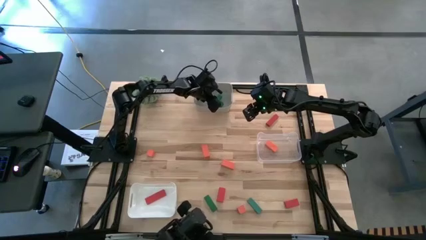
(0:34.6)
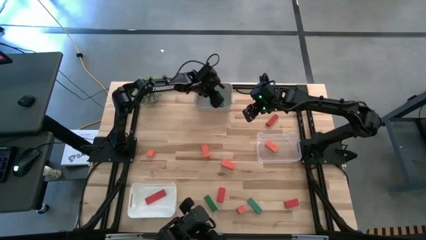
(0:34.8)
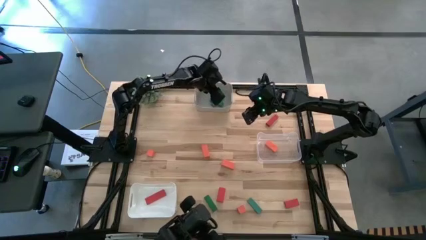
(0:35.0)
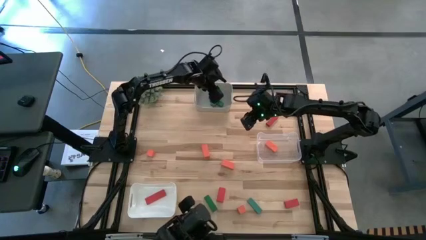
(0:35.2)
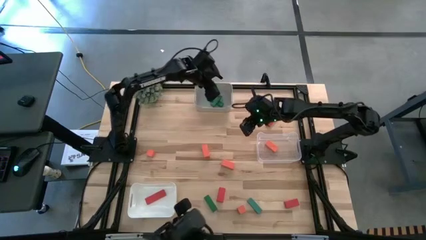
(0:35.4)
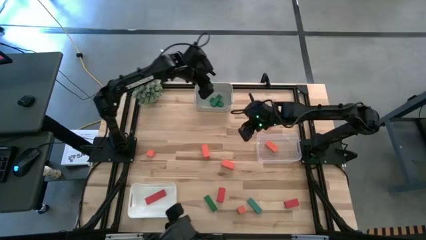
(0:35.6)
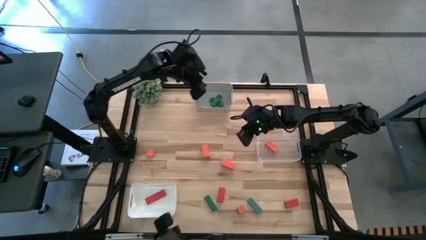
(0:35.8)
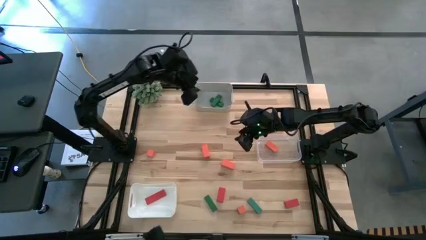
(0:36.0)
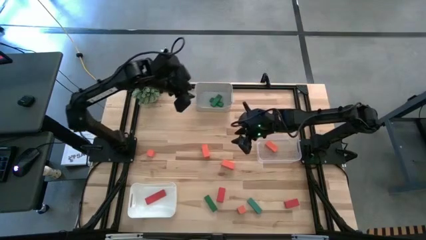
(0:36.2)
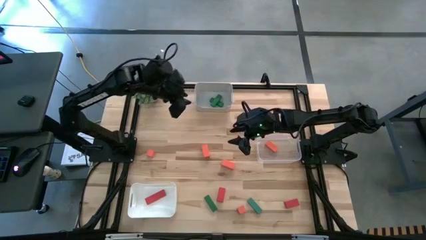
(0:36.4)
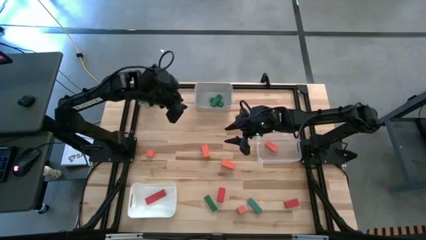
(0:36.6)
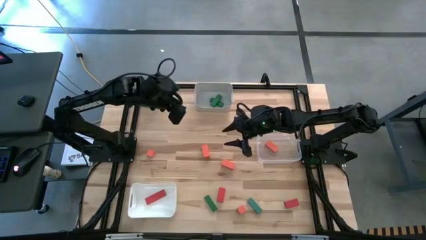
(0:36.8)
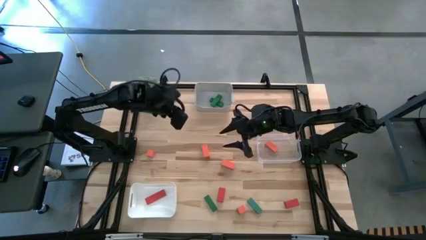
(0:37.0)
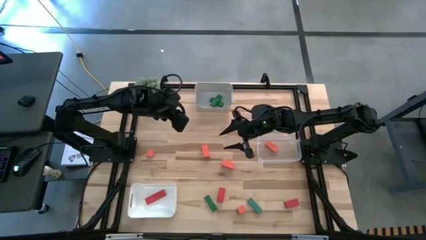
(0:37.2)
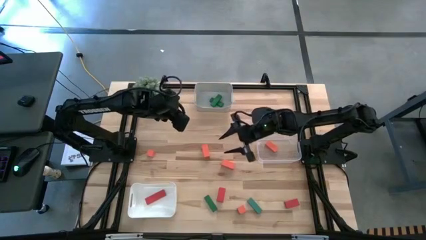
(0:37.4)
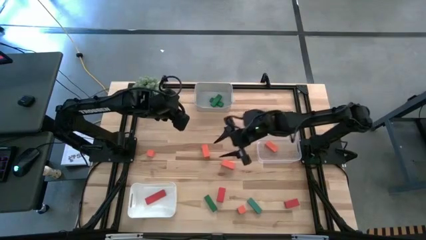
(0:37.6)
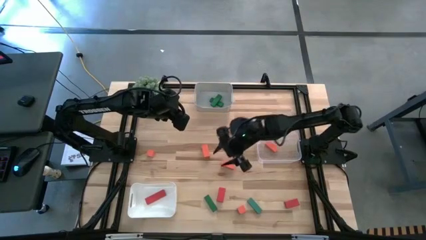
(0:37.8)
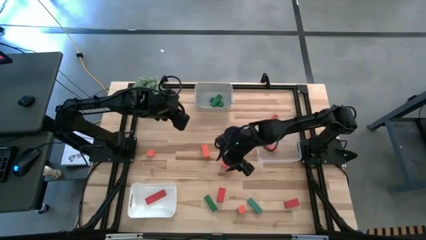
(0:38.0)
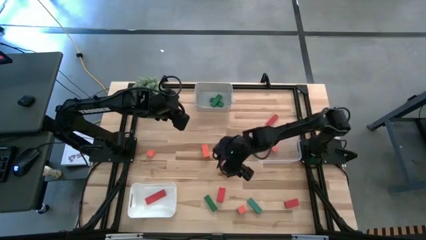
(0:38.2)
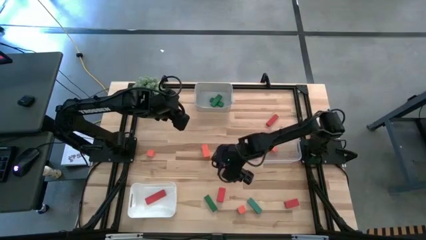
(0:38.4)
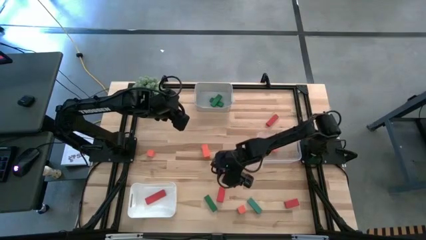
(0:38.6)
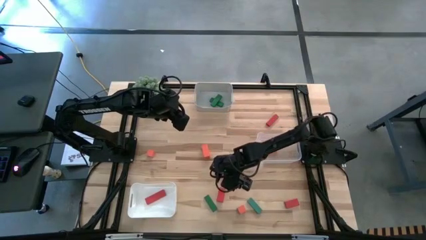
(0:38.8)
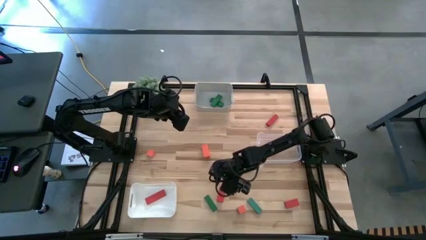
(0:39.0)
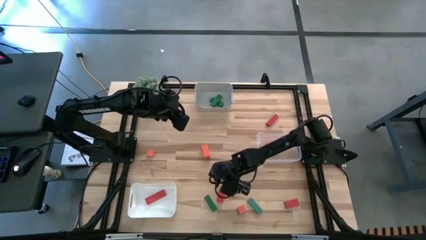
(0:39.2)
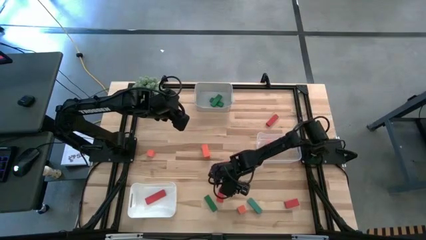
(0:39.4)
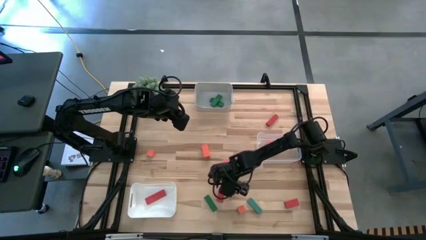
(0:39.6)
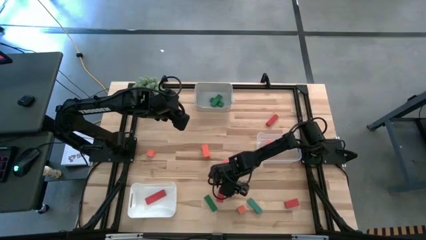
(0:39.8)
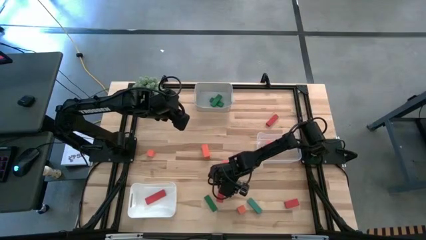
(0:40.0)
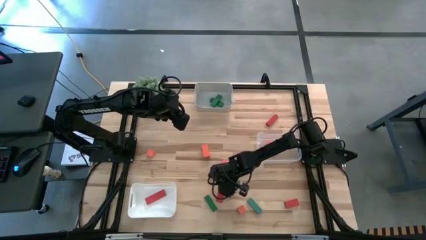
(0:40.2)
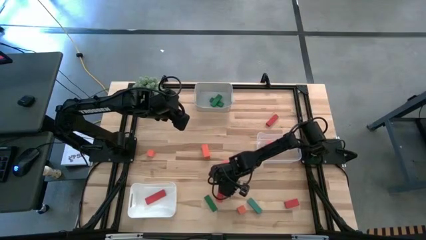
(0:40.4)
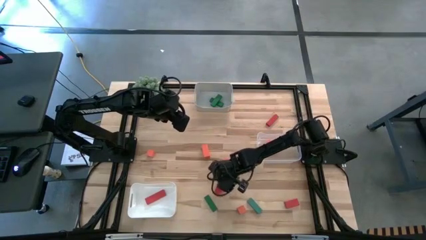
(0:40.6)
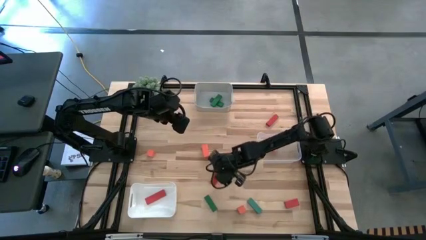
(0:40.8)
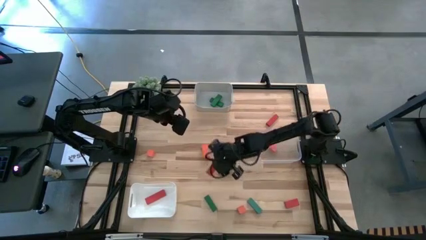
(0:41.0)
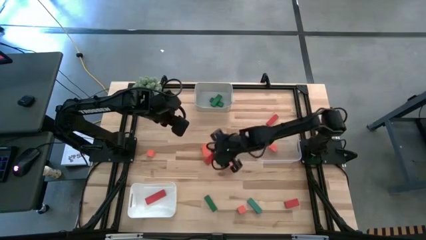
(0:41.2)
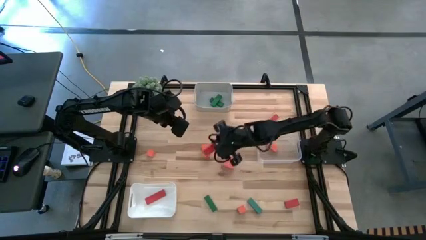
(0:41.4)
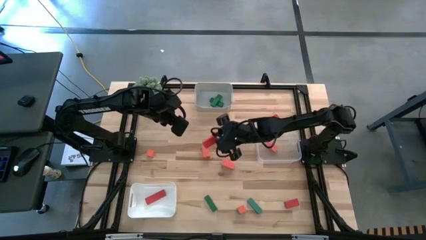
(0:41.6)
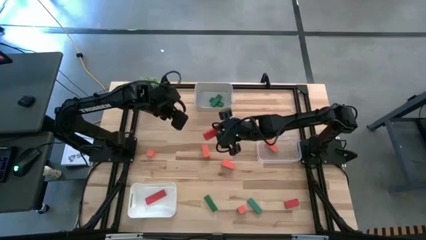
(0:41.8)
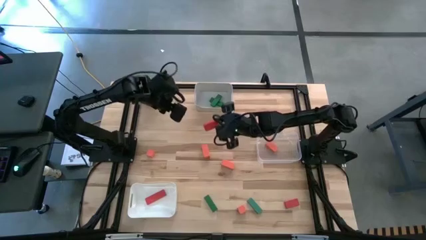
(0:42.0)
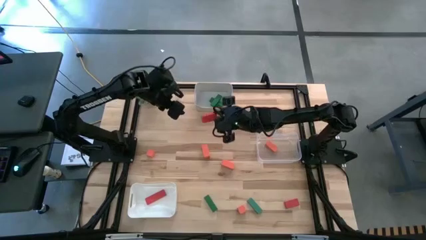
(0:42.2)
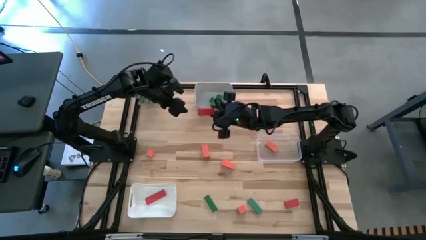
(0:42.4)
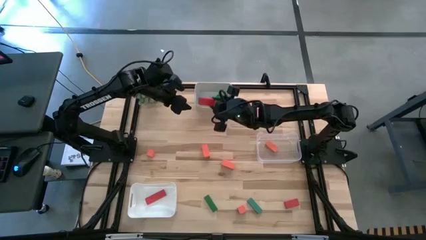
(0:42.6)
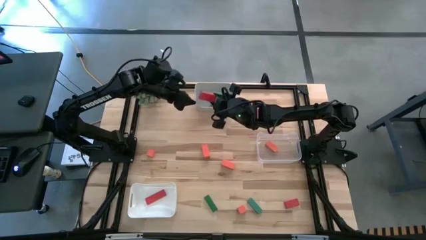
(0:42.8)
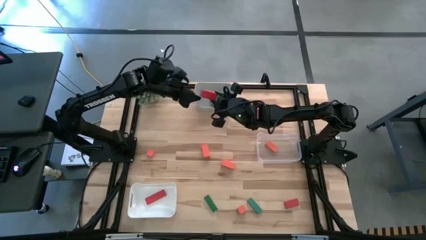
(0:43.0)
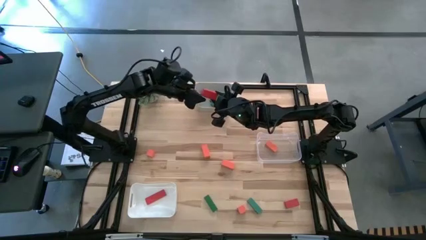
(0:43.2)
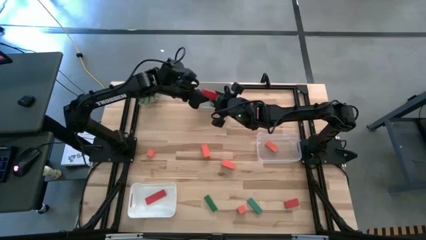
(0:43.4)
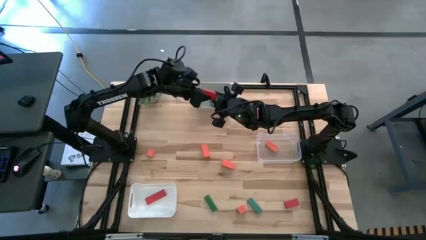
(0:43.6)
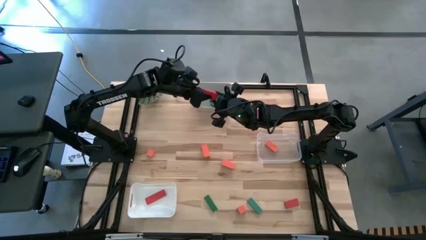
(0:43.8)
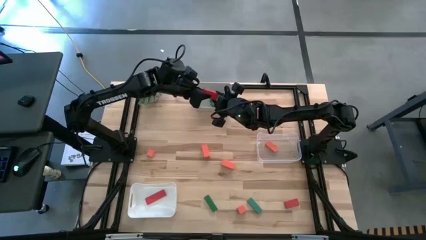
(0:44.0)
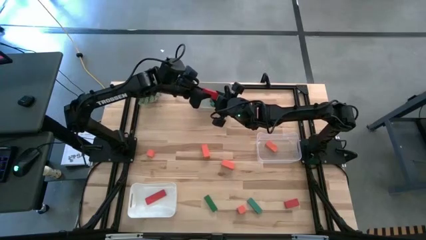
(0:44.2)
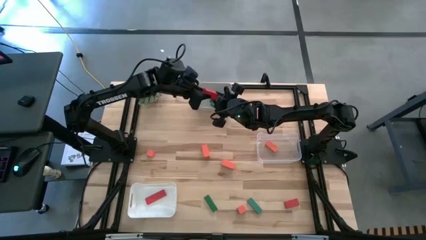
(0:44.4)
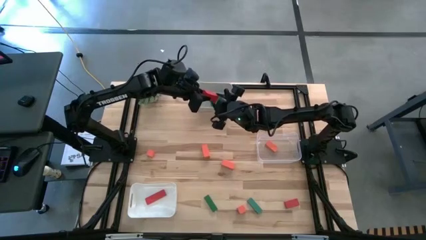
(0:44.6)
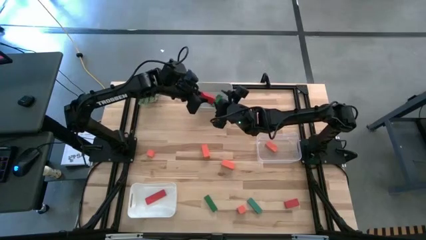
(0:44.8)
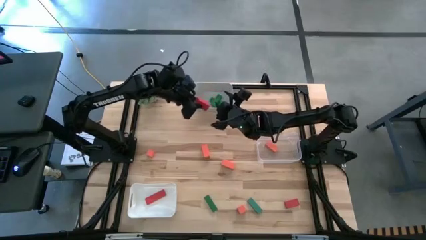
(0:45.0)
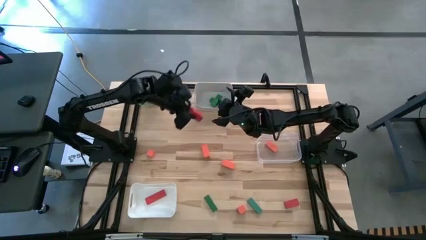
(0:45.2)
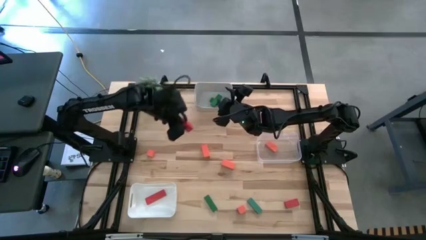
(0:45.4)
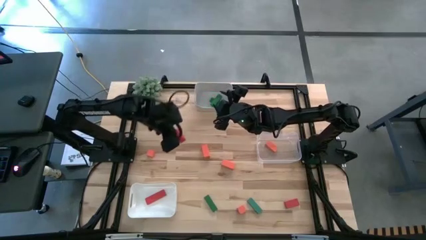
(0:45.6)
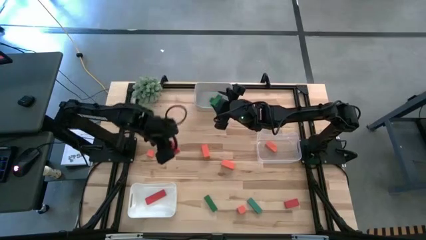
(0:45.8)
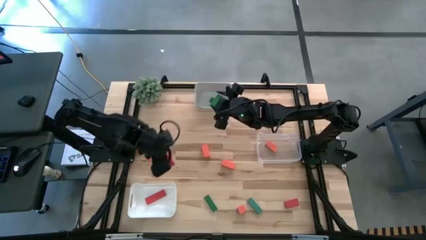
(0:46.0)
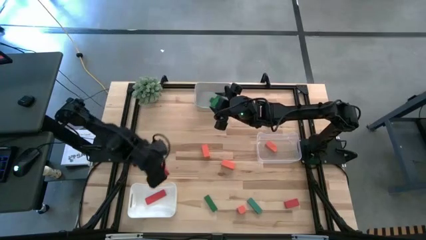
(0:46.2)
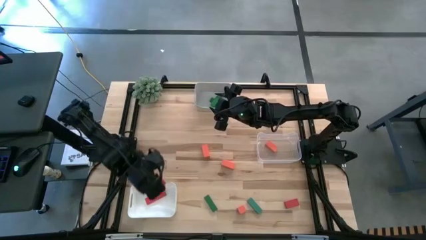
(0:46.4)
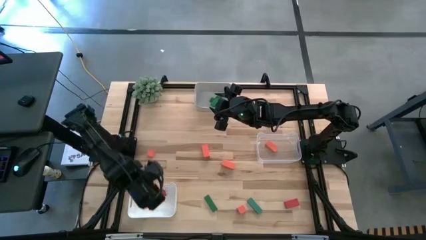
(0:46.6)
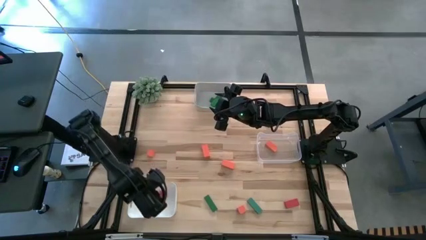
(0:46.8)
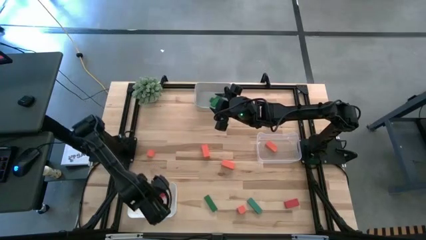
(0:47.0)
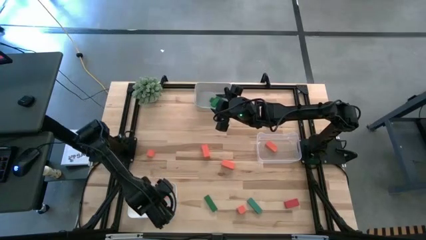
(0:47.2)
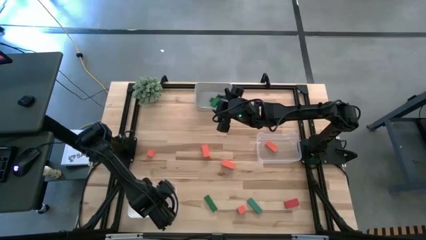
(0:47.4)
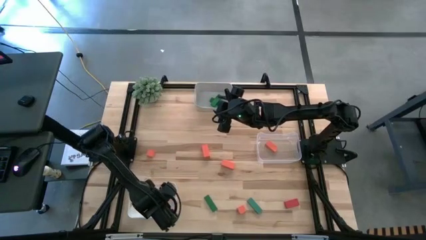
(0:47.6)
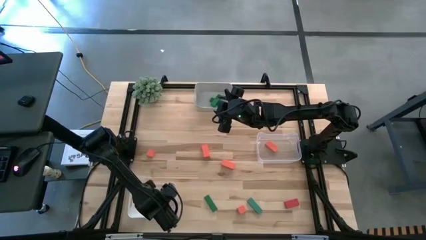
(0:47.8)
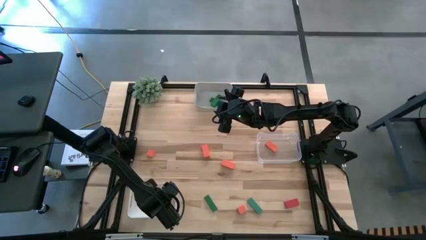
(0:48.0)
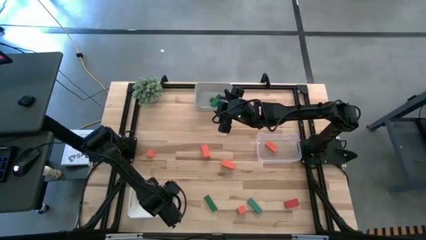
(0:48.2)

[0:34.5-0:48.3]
Task: Sort & place blocks by color
Put the red block into the white bin

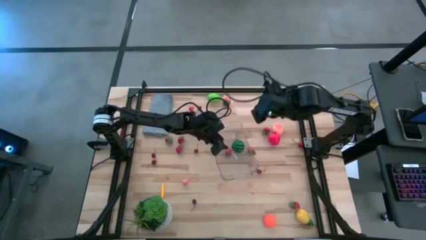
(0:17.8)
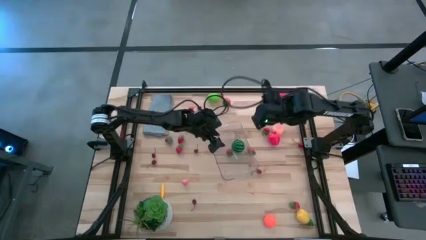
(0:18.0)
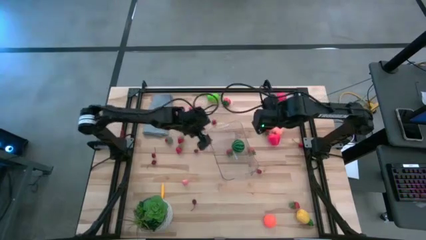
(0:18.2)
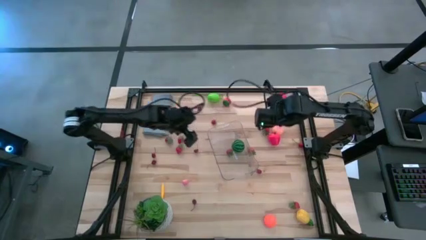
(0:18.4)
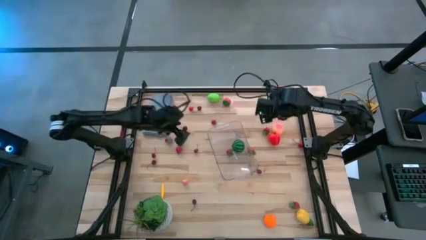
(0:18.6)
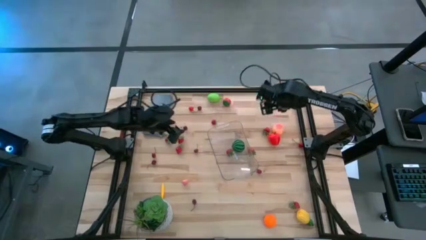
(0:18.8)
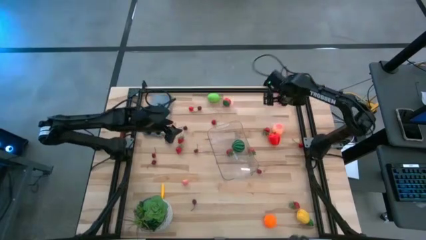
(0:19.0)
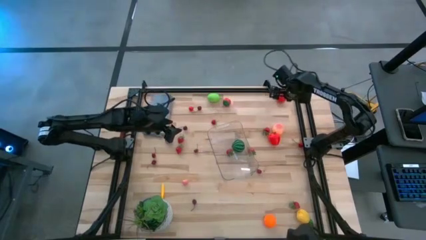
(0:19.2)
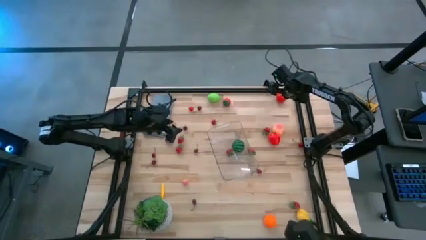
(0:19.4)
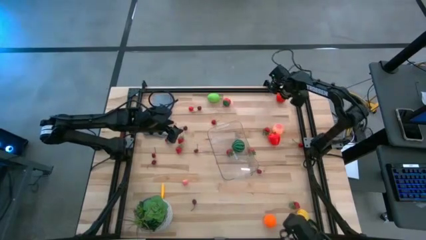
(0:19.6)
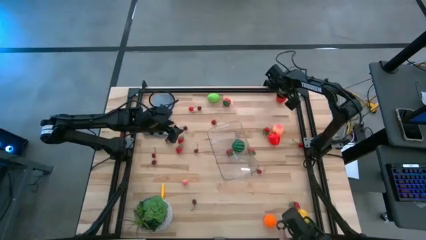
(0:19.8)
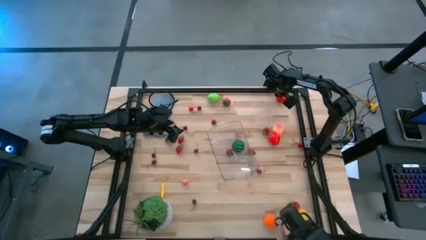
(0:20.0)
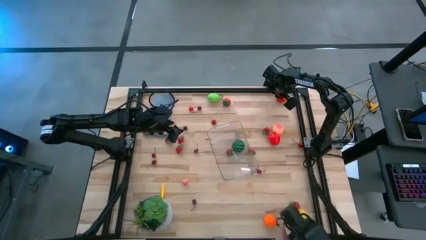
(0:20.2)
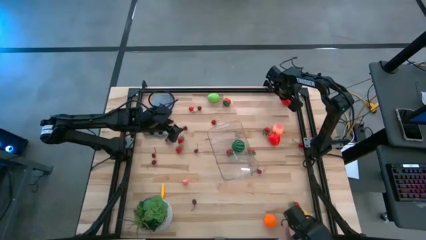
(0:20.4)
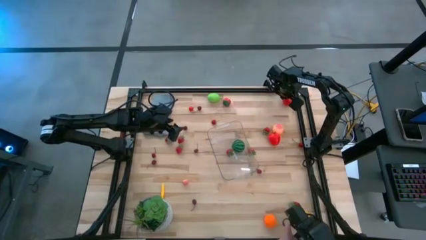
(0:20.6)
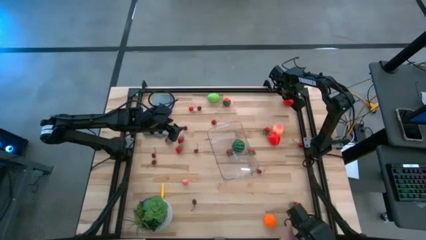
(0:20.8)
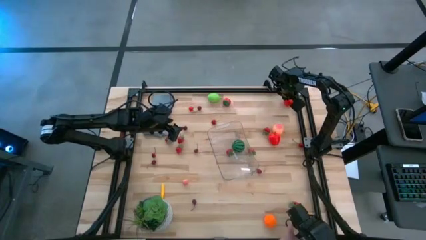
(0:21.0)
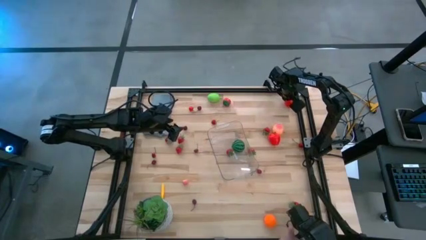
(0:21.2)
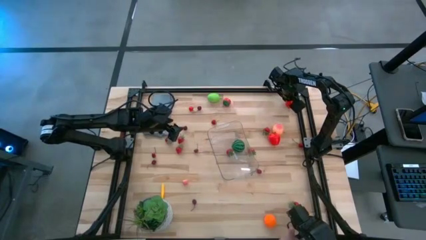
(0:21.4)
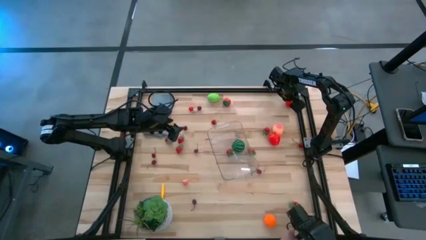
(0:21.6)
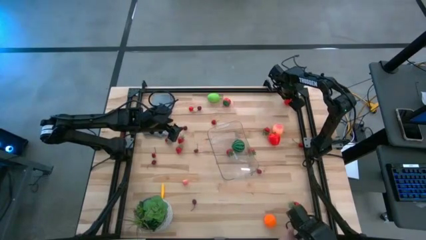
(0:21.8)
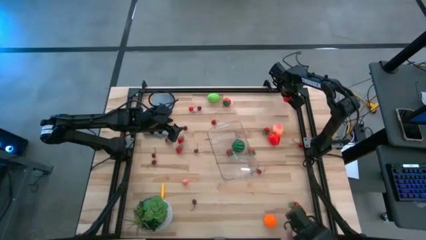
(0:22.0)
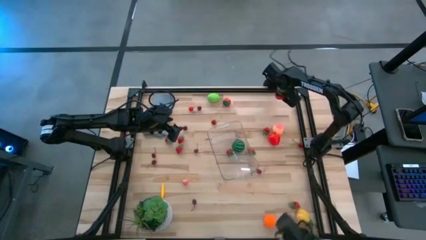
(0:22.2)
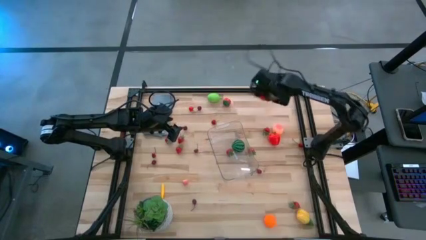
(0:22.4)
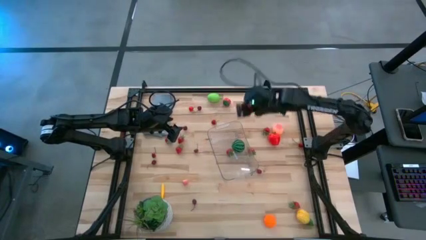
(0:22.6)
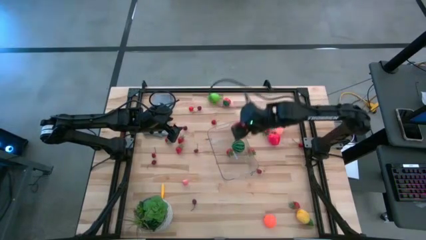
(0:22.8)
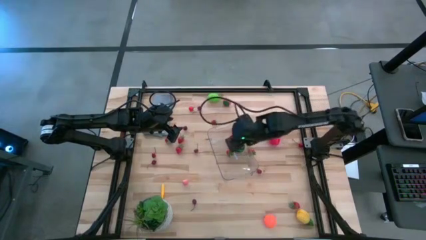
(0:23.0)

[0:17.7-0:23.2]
Task: Pick and placing Produce into tupperware
Put the red tomato into the transparent bin
